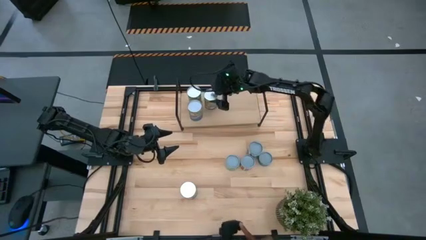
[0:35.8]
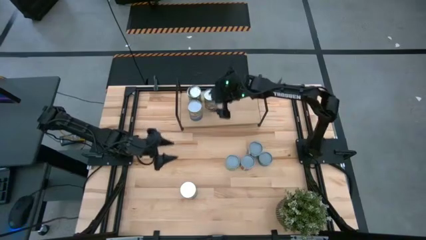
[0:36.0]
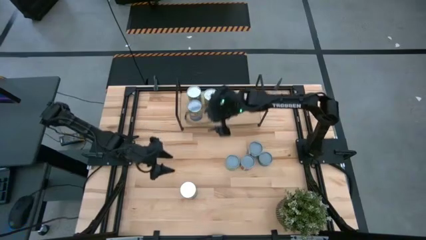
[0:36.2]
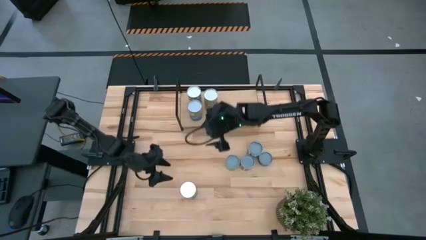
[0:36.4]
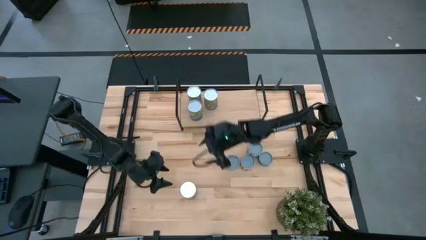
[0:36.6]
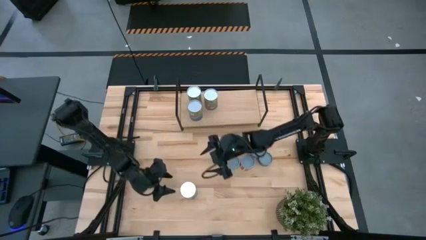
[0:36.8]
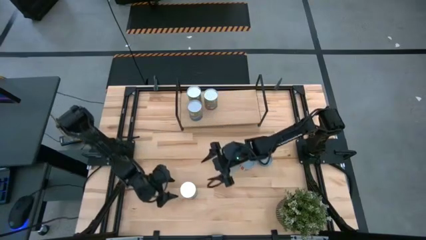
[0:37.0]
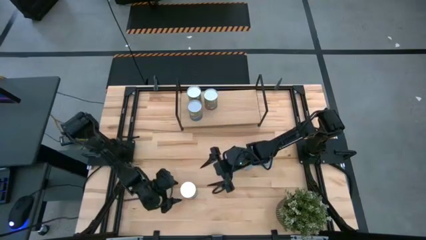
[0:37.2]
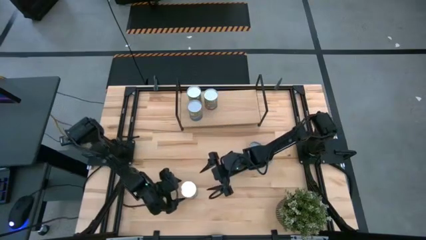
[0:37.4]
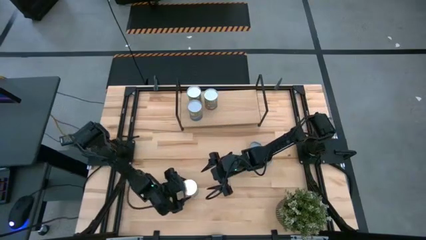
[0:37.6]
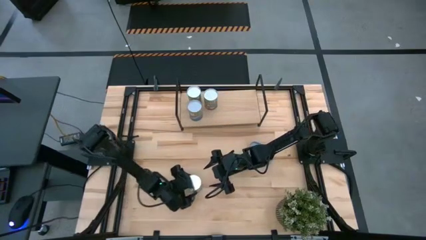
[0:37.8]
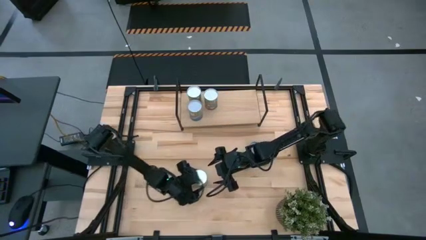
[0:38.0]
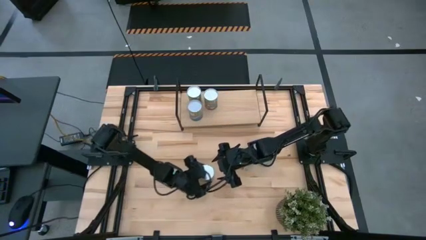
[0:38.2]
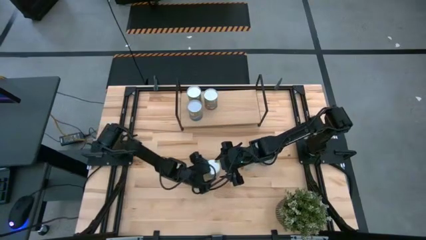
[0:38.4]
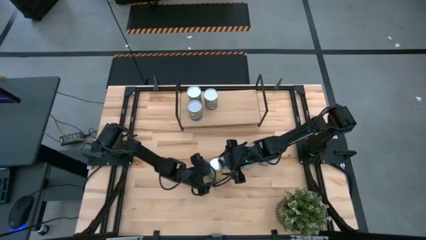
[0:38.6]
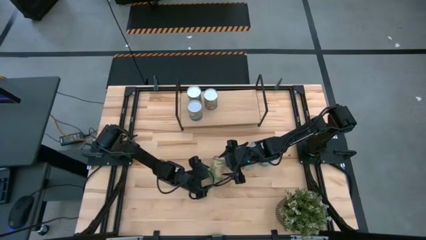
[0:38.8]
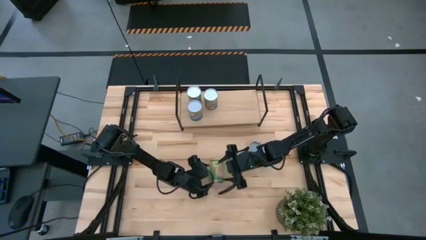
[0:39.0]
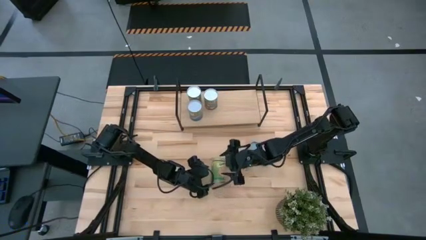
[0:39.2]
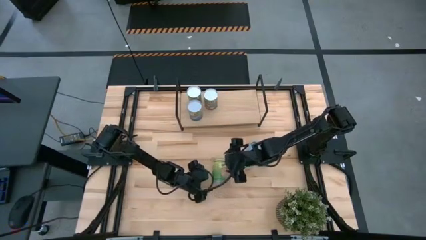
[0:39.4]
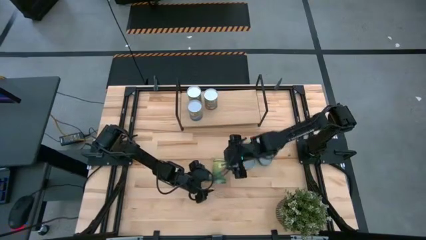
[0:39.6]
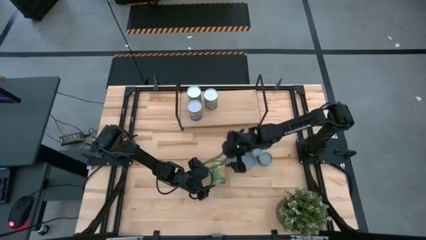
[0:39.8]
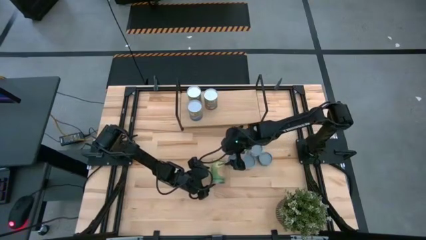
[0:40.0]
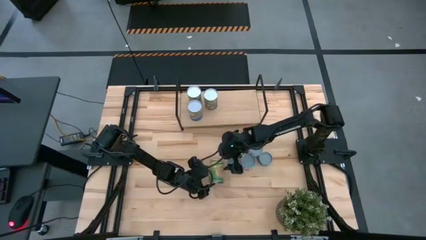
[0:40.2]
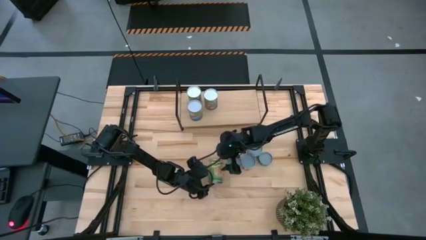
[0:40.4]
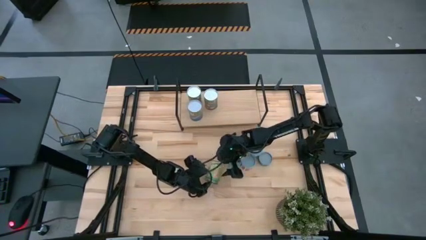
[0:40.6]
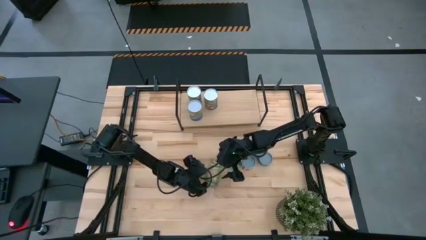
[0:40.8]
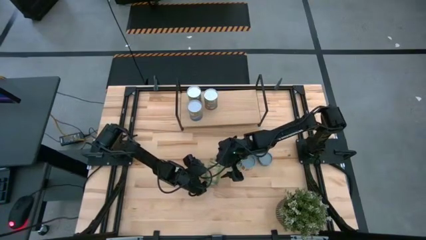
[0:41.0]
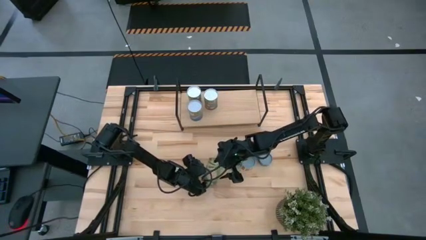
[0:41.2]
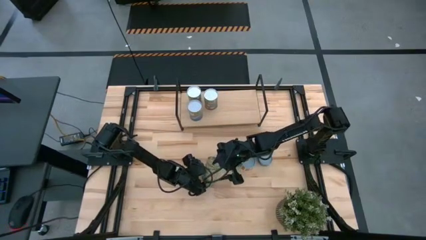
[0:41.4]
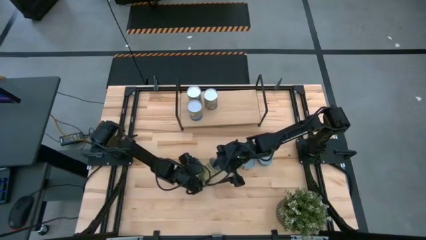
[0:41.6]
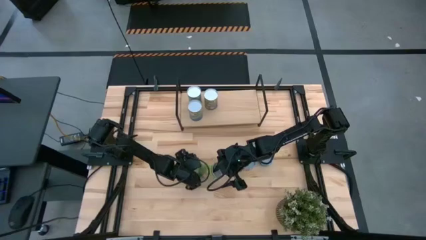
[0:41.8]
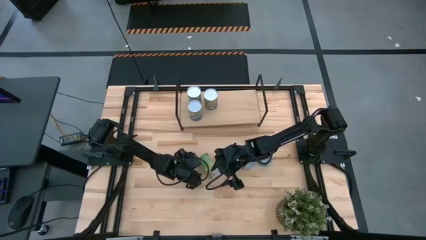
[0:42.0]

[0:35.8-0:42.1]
Task: Pick and place cans onto a shelf
Put the canned oranges on the shelf

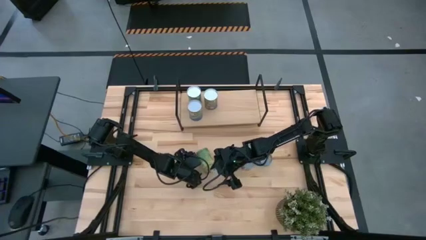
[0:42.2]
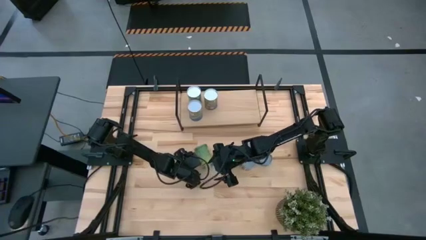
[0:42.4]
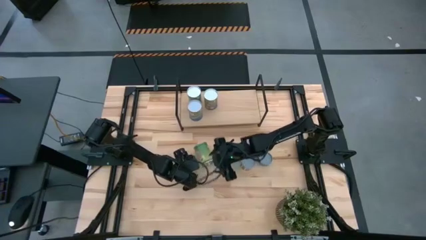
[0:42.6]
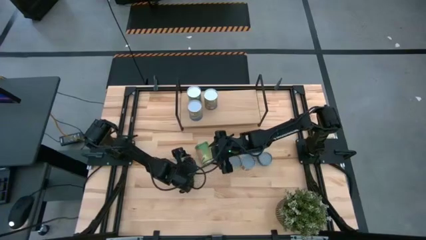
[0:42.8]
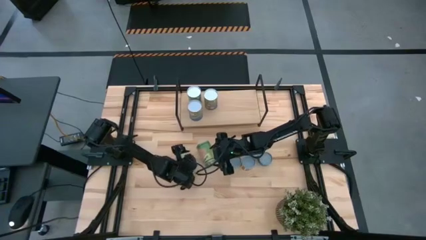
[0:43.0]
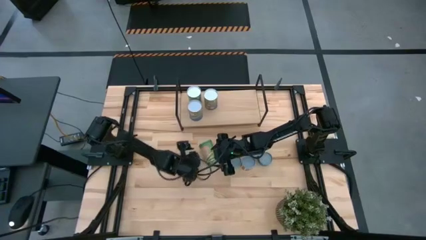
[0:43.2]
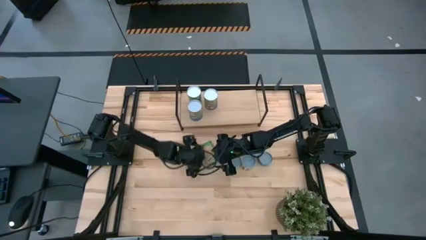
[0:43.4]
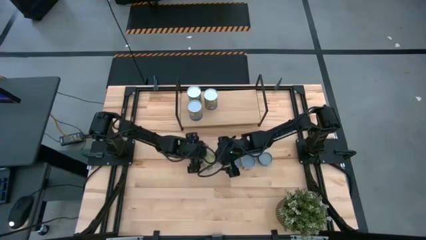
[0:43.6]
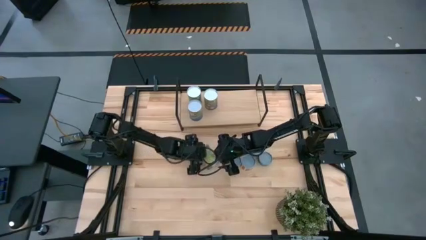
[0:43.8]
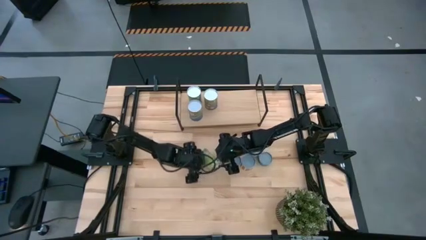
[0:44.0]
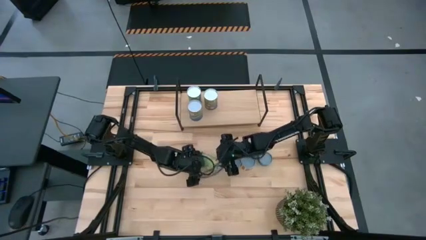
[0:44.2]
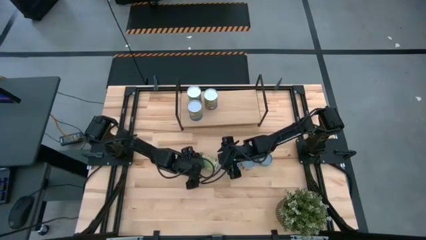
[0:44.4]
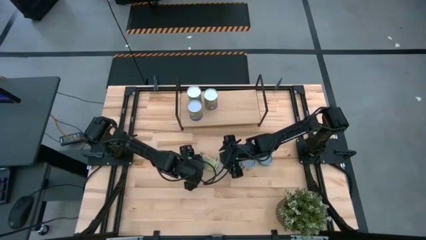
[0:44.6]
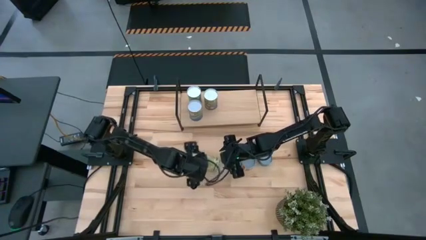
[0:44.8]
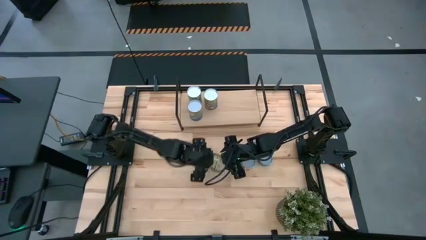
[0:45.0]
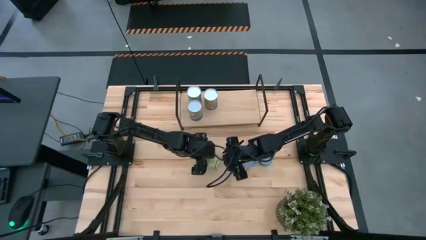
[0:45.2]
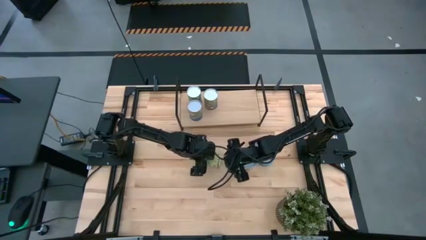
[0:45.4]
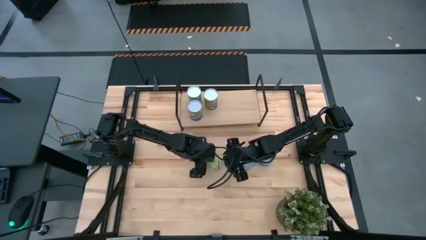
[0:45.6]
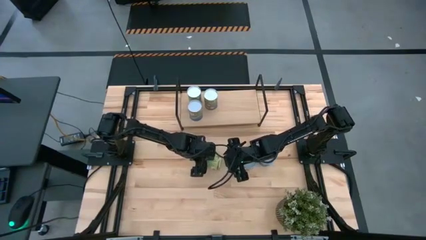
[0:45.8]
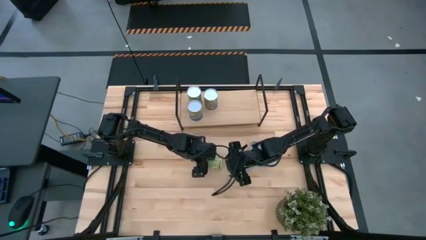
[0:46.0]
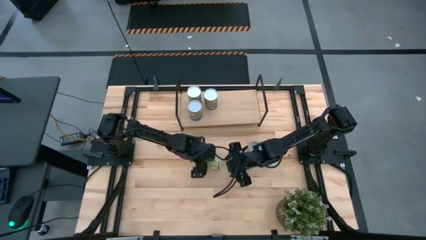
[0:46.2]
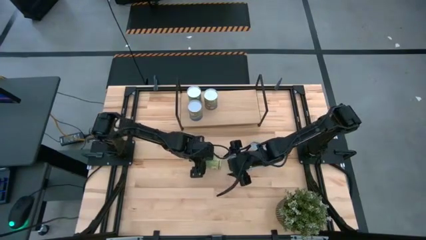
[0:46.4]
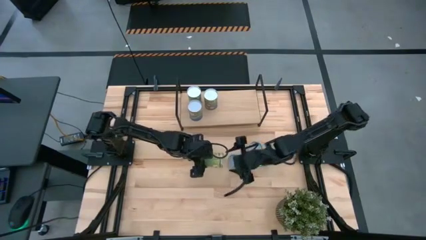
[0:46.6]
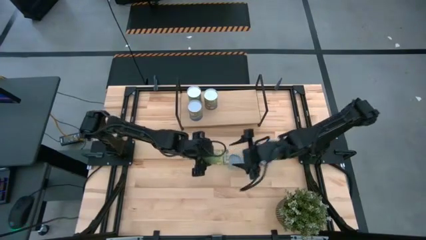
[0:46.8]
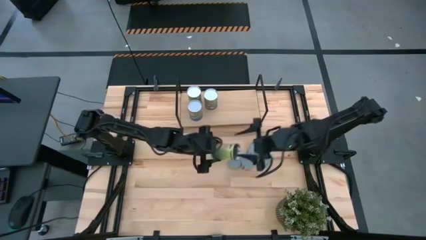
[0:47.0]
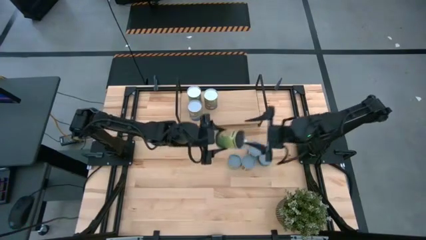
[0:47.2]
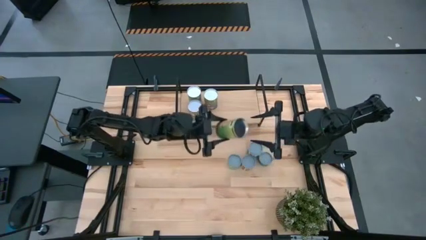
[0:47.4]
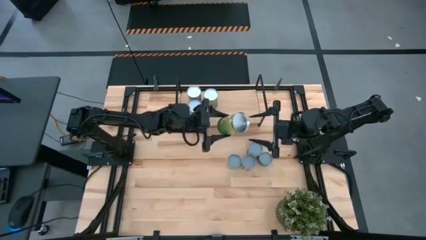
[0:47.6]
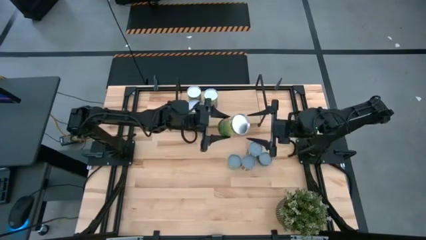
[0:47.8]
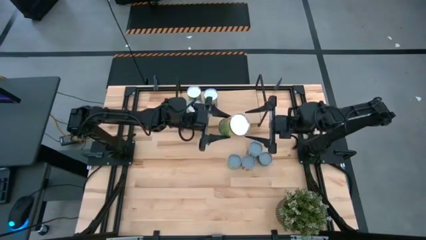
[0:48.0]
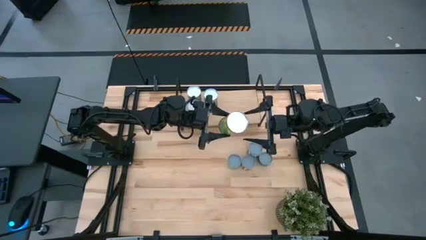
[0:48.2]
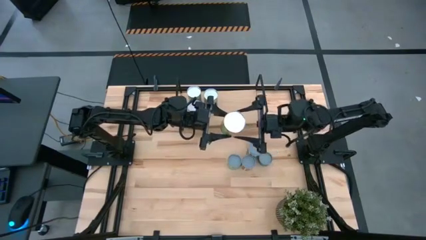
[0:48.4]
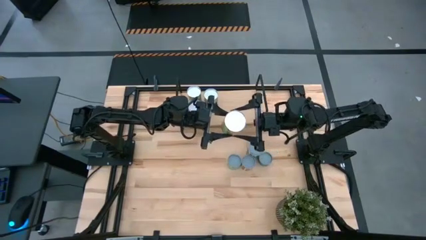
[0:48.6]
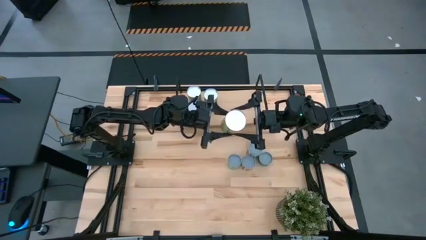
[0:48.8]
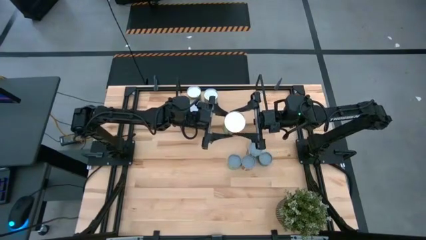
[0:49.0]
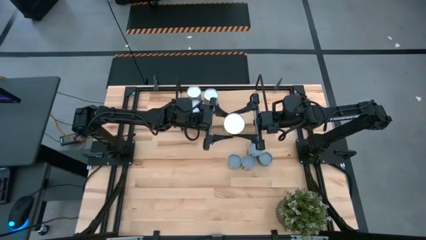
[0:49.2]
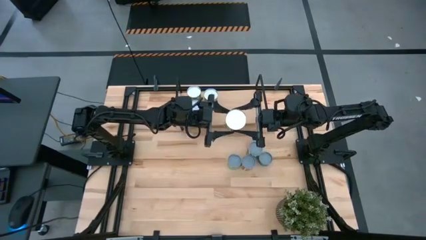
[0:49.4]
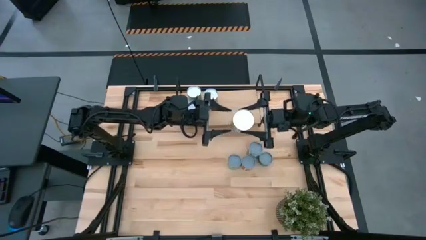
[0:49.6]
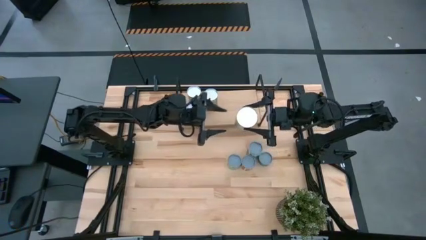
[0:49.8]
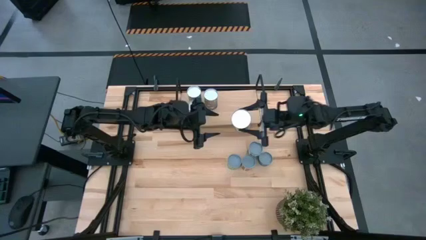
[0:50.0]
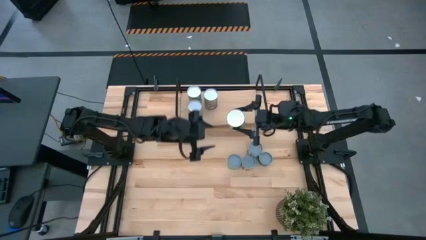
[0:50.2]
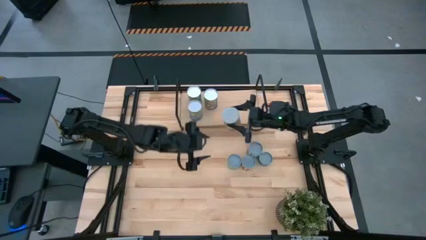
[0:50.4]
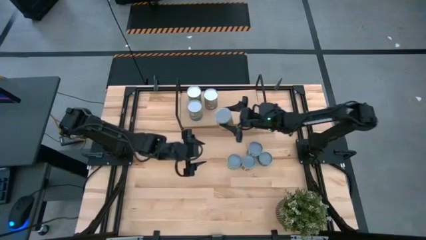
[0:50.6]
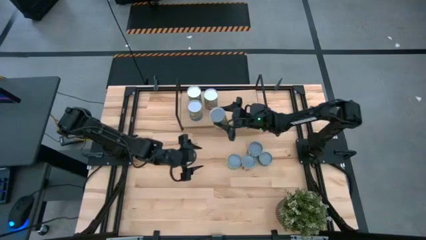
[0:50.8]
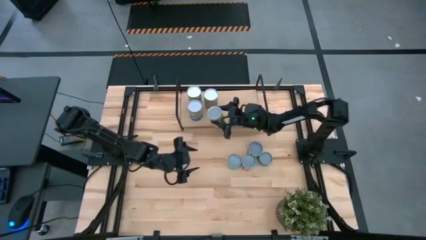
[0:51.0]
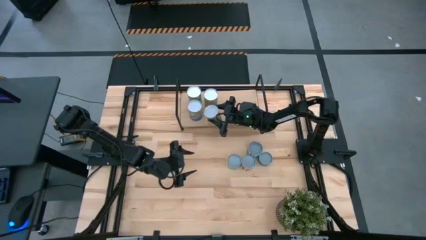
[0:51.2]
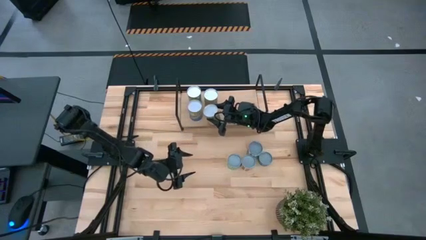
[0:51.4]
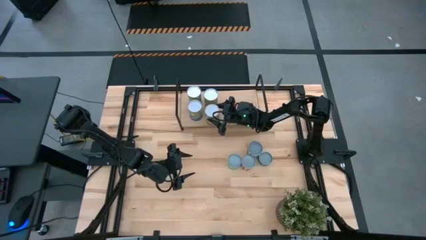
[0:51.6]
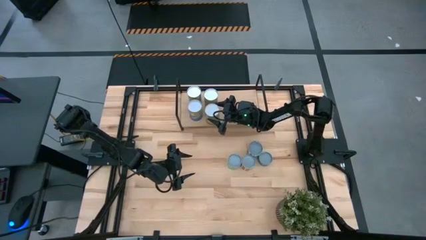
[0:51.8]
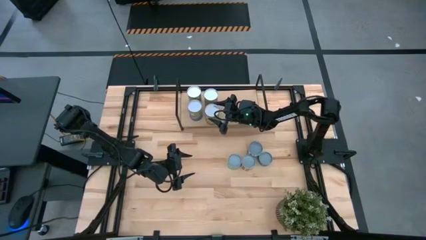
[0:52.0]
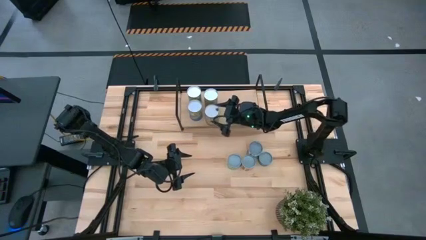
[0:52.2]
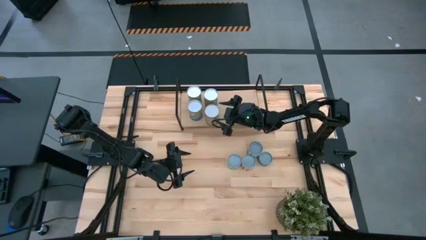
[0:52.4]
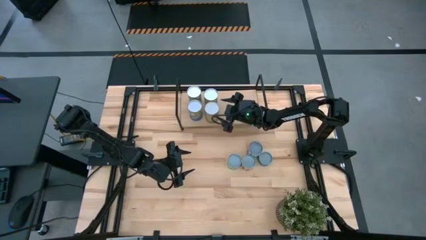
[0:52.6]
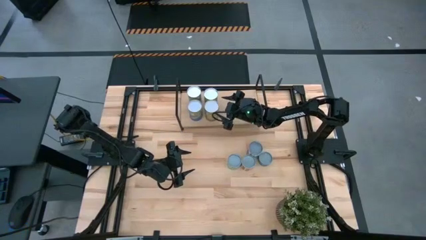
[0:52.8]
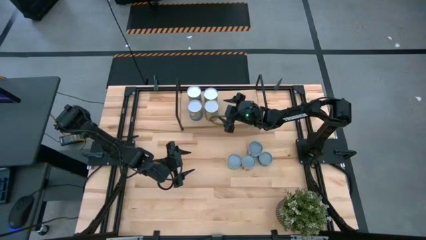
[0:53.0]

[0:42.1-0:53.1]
Put the canned oranges on the shelf
